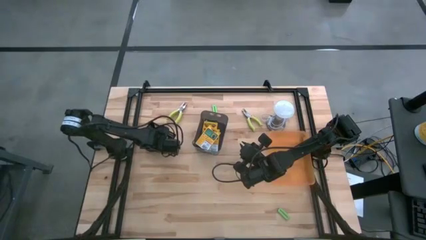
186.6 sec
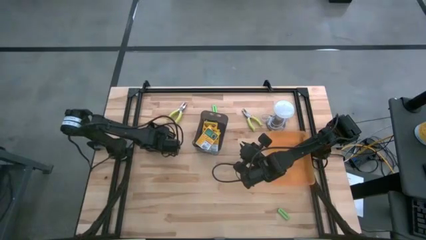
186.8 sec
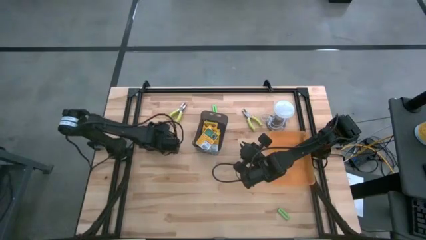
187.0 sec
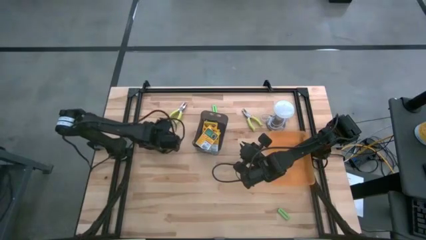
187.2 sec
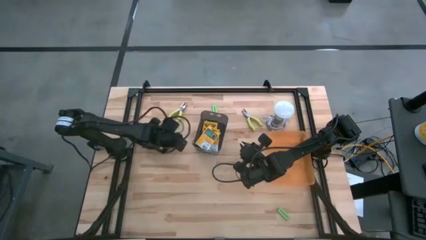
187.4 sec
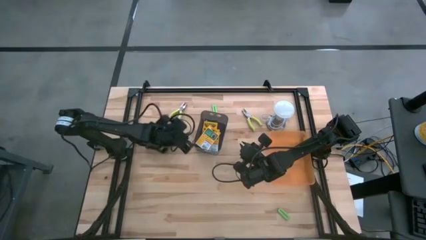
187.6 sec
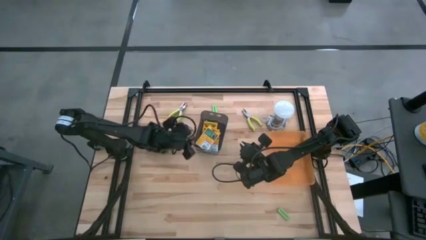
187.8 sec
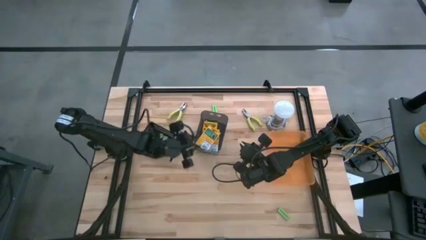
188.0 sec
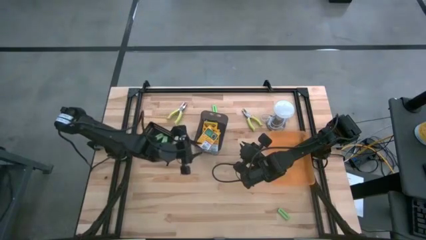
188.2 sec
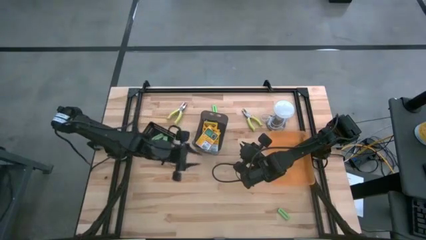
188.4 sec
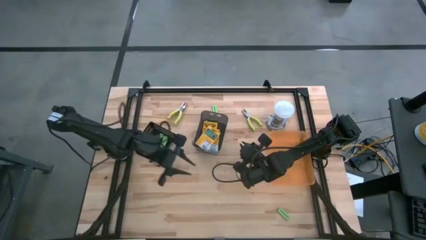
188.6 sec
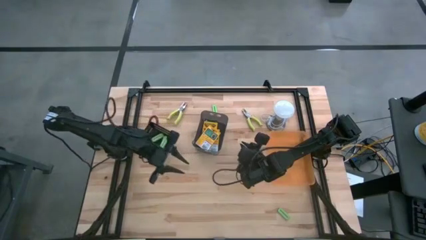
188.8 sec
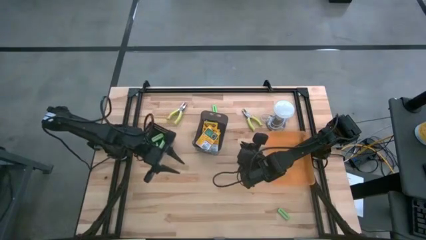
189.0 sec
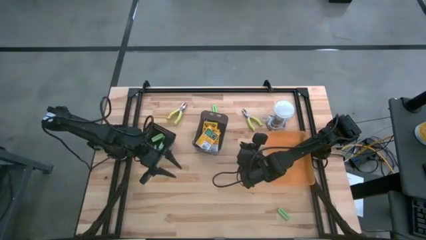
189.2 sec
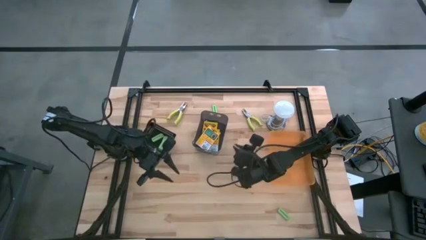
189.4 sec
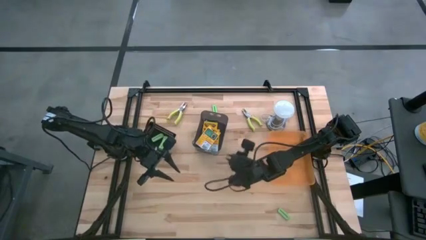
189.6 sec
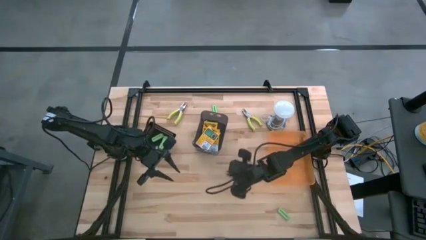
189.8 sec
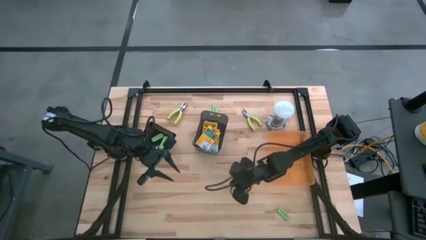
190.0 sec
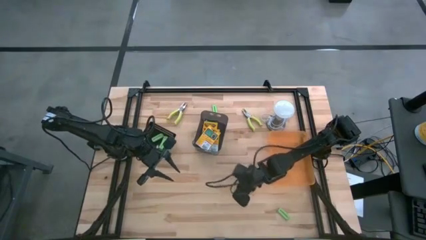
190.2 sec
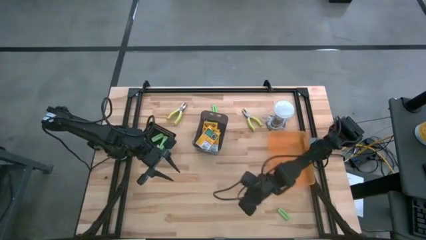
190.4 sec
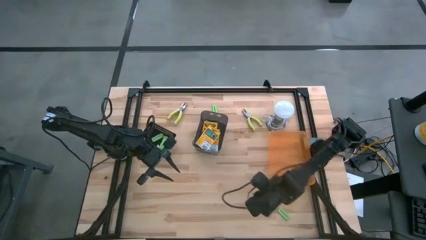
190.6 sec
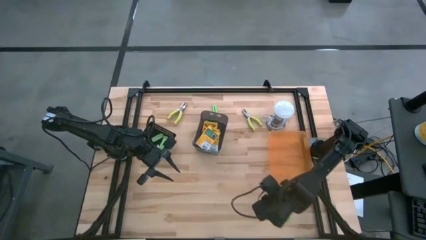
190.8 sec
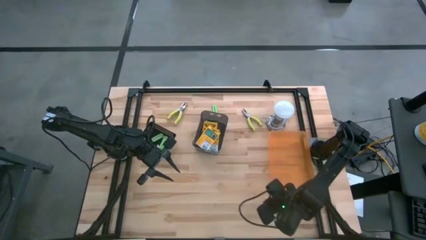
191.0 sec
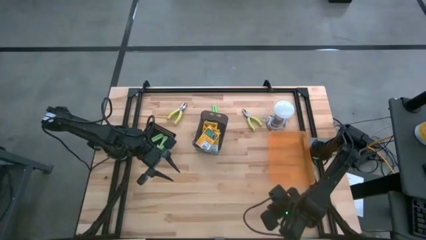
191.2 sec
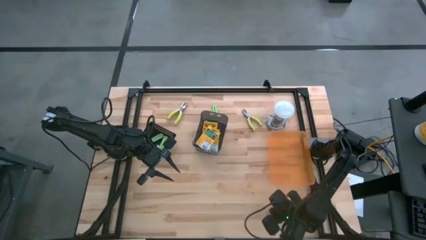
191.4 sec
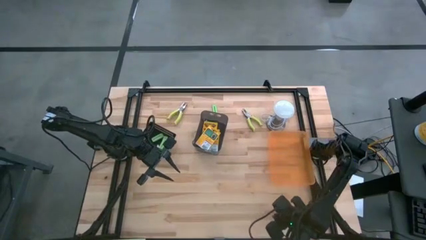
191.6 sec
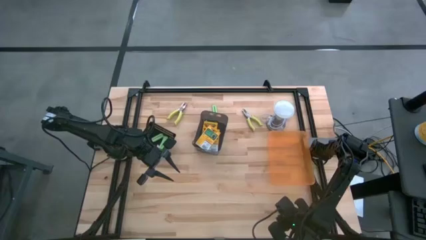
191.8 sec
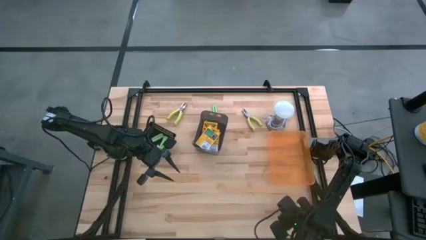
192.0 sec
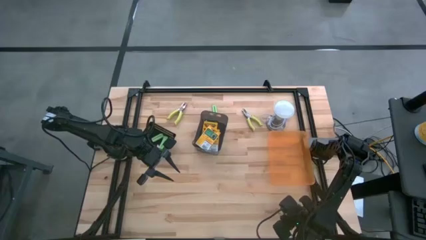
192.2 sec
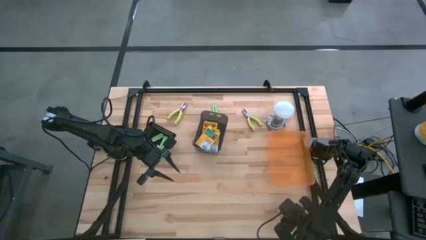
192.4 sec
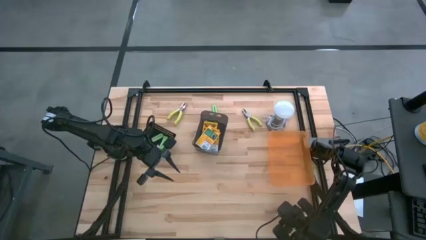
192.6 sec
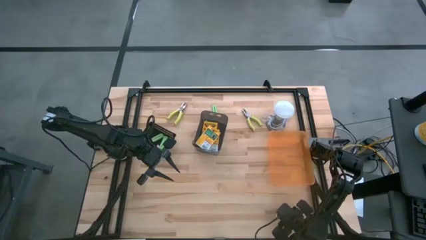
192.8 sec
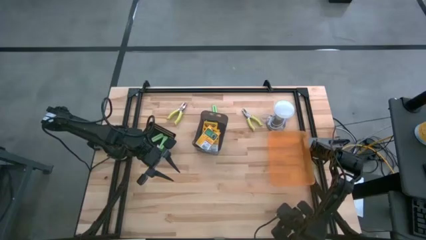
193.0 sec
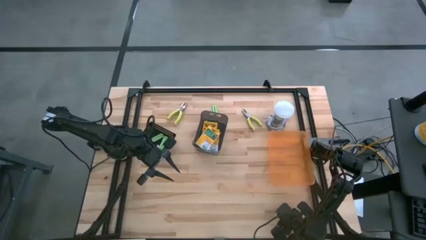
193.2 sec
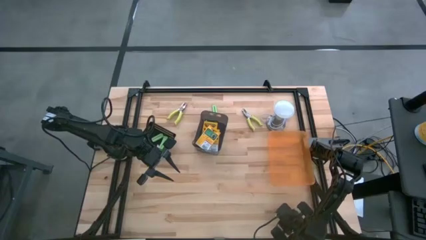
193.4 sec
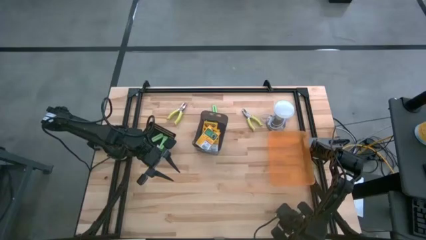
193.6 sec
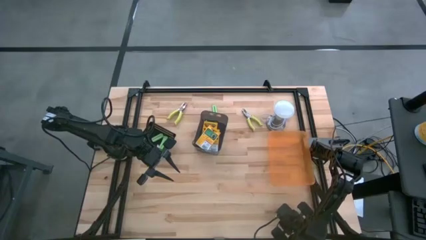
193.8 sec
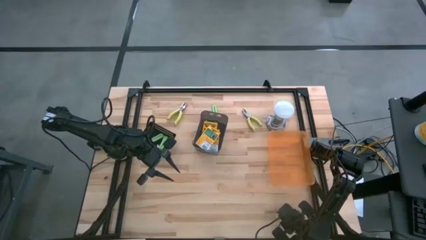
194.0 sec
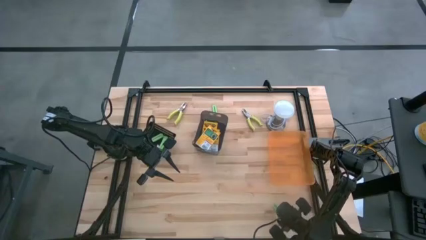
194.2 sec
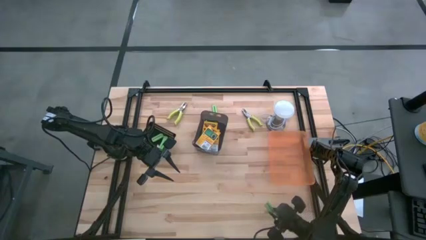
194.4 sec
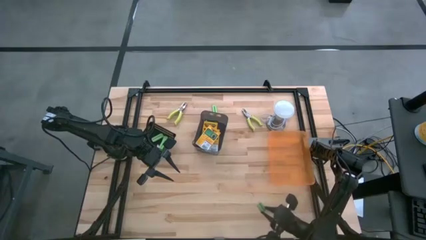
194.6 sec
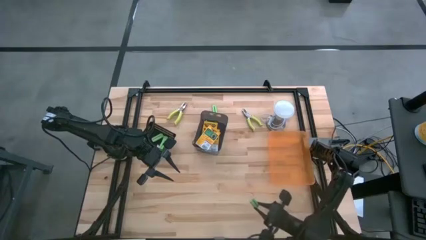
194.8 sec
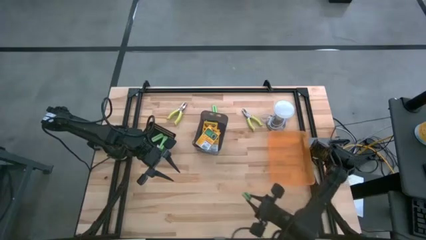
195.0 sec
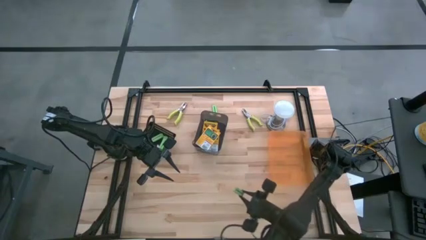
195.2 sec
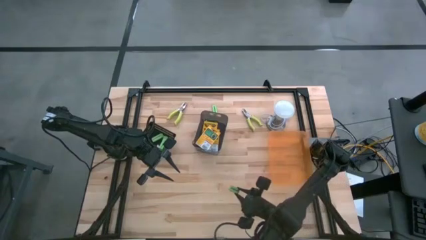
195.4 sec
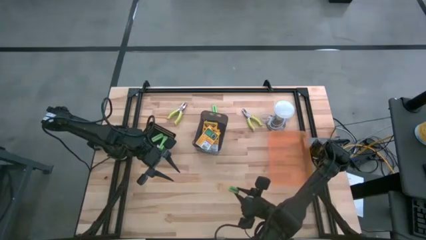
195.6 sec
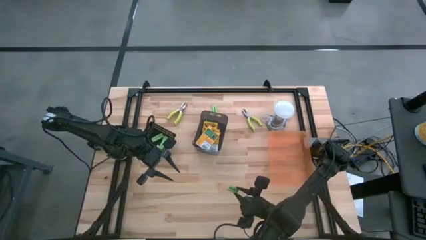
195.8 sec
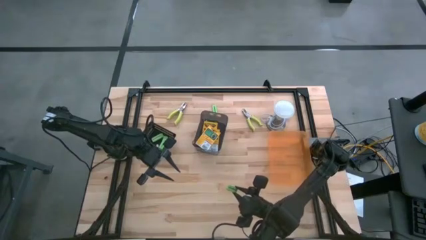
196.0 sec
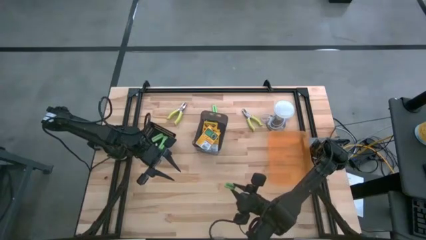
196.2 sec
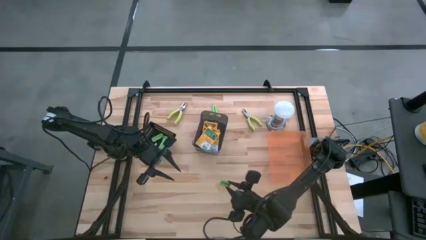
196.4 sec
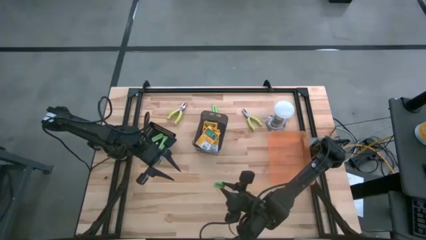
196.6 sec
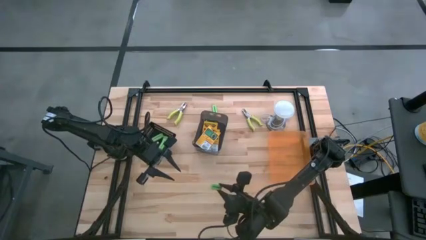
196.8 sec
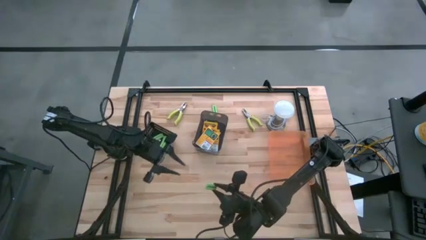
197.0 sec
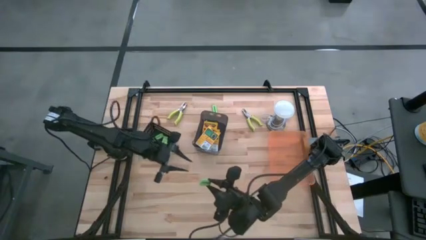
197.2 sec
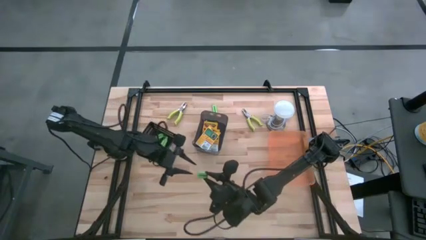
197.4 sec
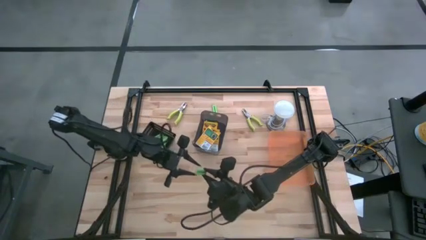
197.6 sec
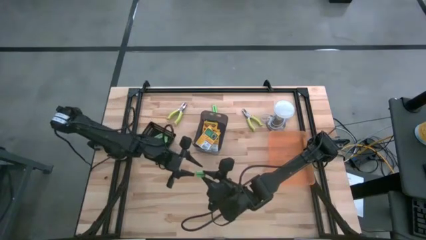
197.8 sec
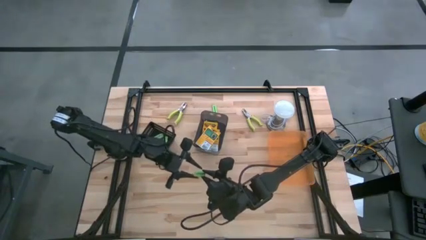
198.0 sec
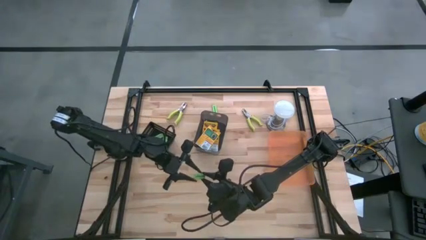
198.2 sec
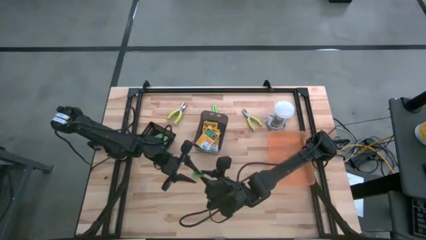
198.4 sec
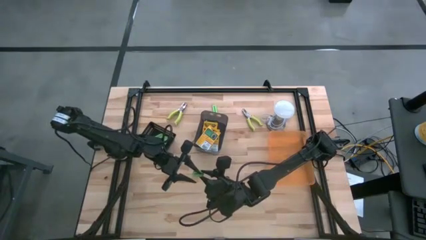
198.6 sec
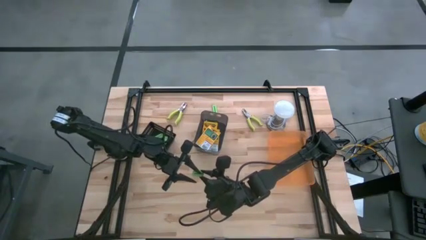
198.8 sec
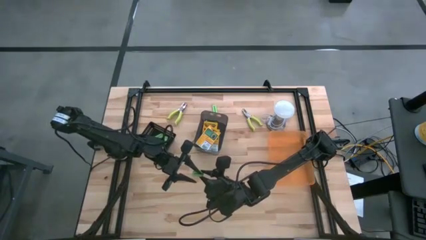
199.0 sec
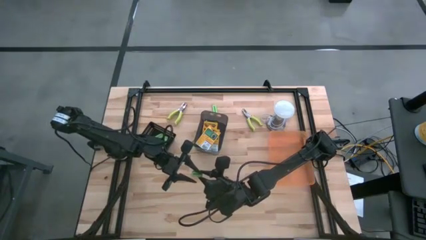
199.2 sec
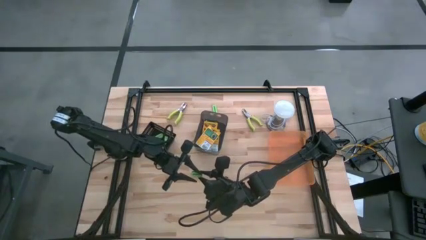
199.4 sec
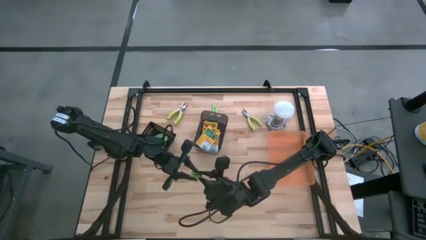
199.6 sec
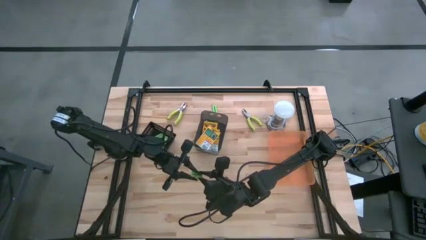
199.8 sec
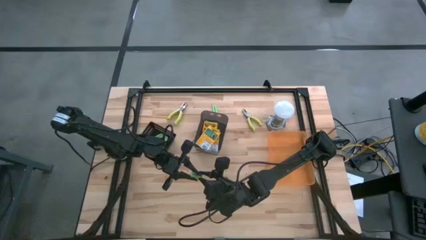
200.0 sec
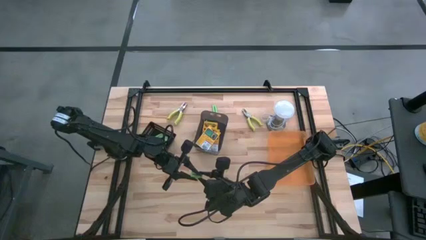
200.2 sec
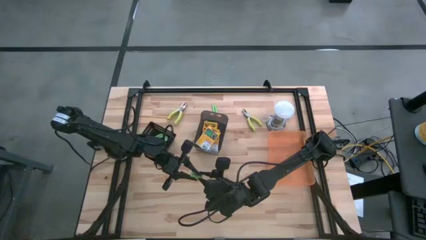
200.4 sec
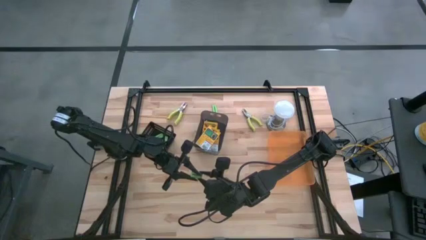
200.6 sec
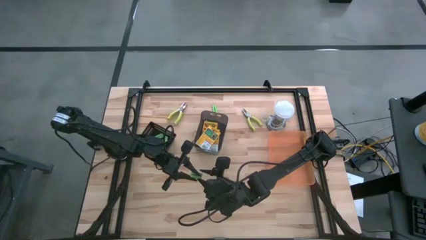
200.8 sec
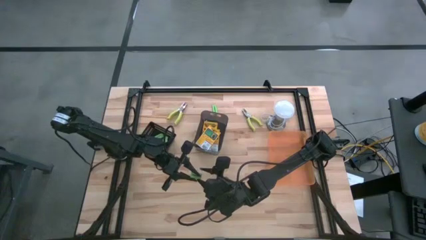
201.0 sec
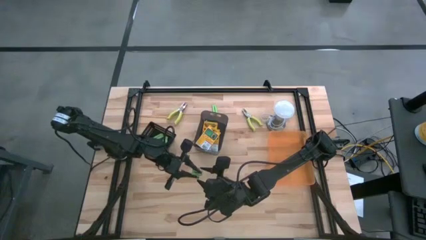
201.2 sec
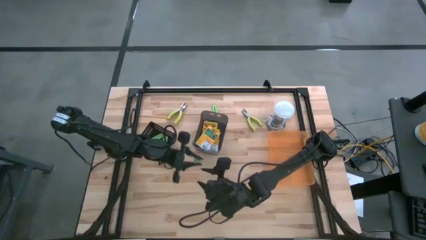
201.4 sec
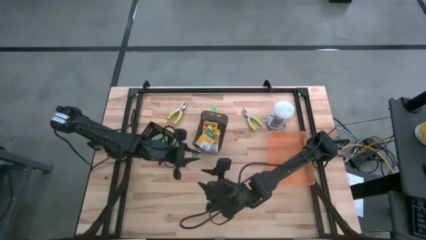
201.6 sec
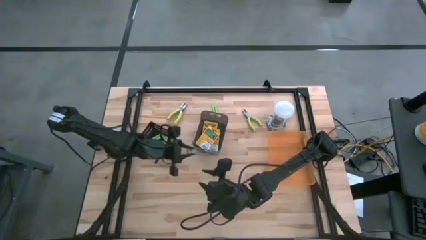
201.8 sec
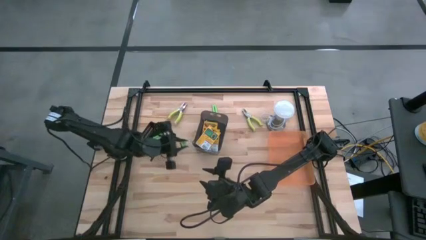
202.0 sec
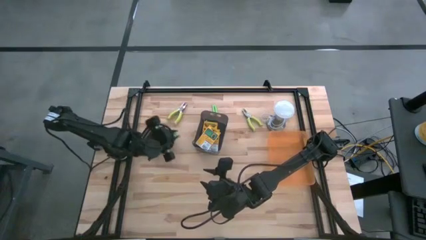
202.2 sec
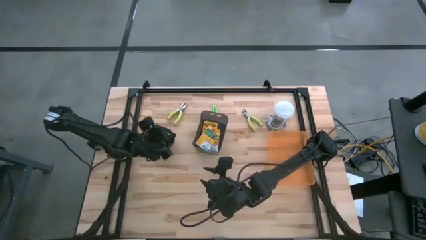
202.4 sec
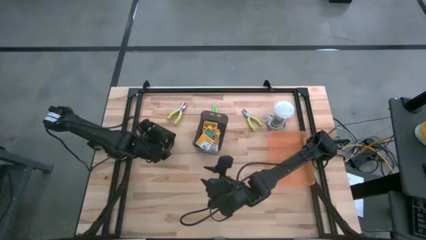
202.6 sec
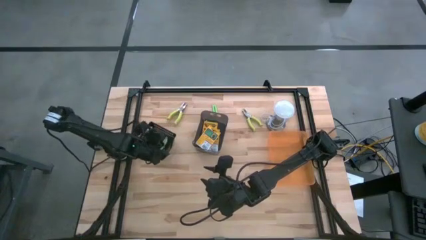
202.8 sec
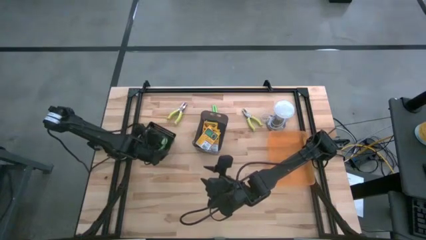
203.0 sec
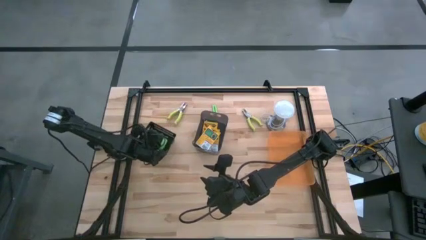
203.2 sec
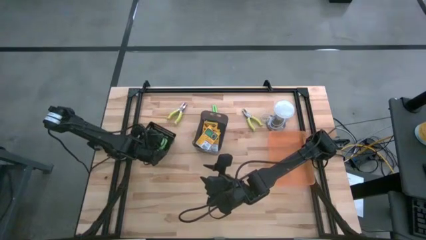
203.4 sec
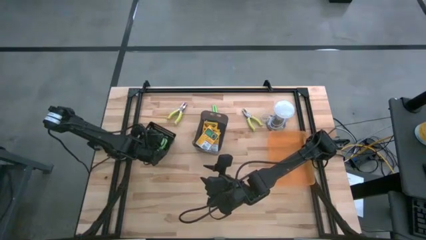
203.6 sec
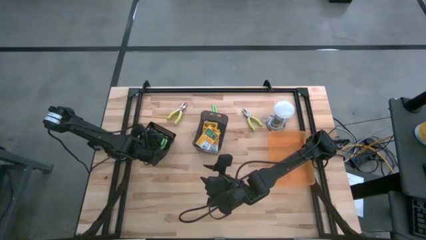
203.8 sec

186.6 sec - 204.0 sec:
Task: Pick & Place School Supplies
Put the bottom light green eraser into the black bin
